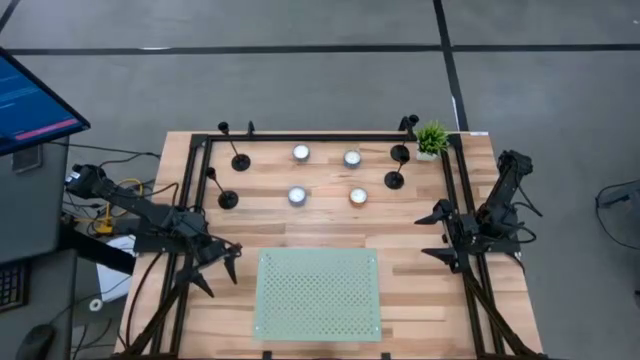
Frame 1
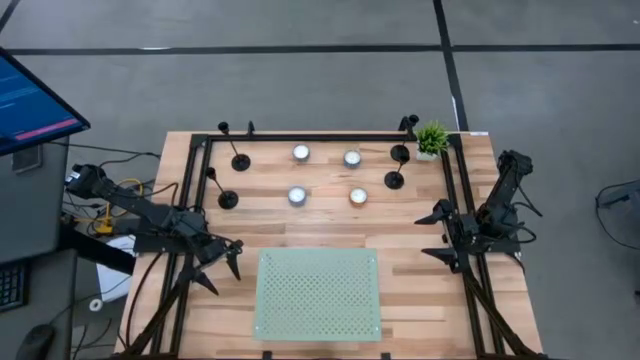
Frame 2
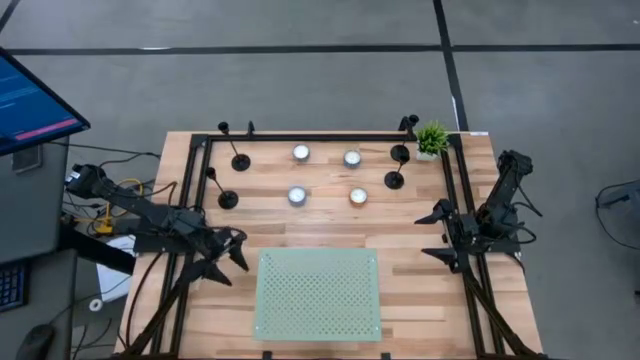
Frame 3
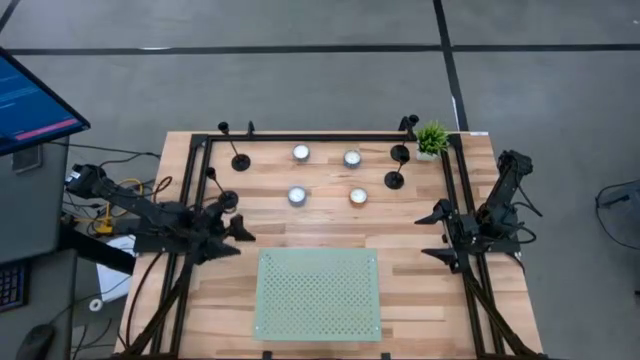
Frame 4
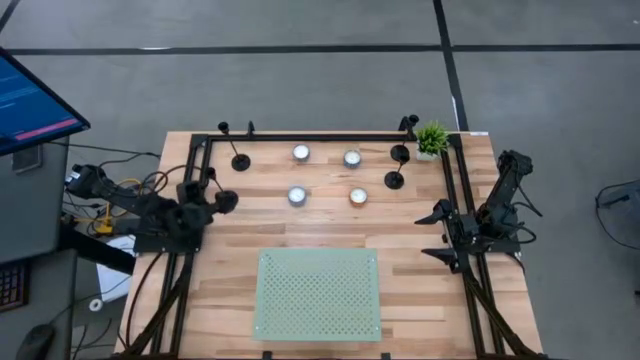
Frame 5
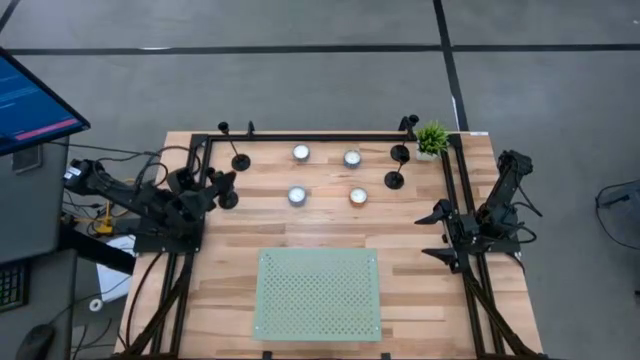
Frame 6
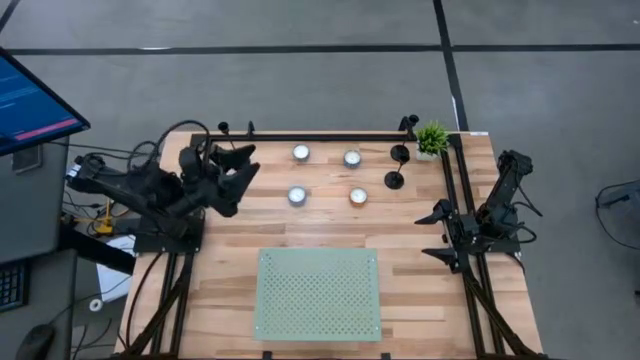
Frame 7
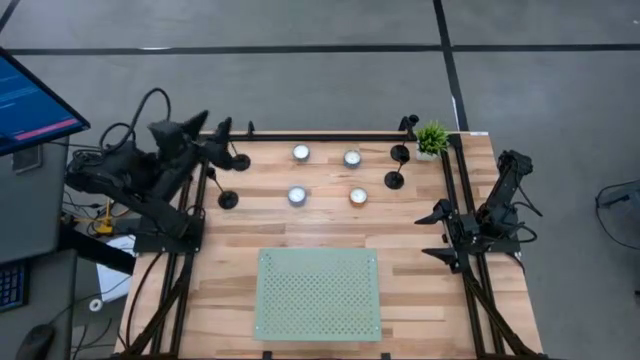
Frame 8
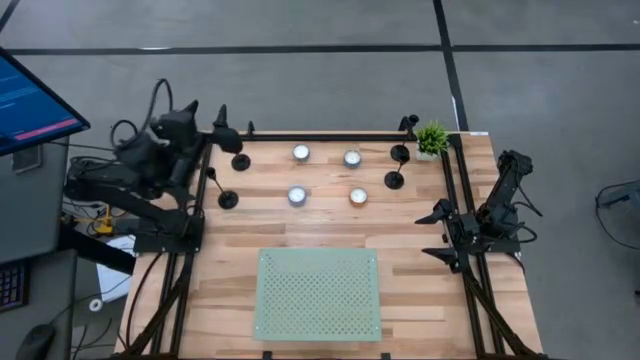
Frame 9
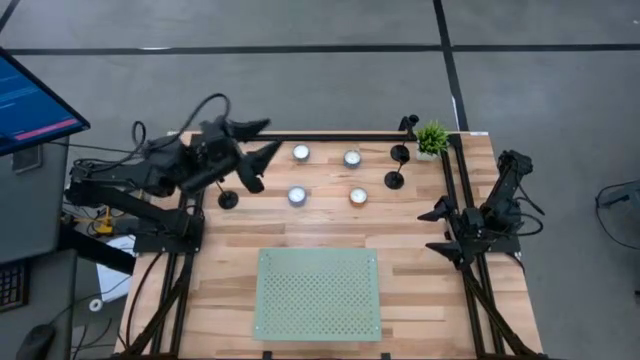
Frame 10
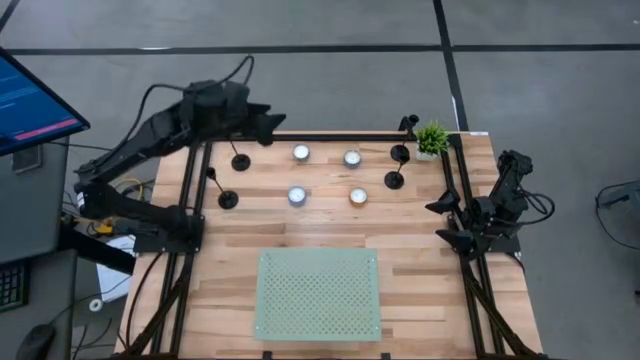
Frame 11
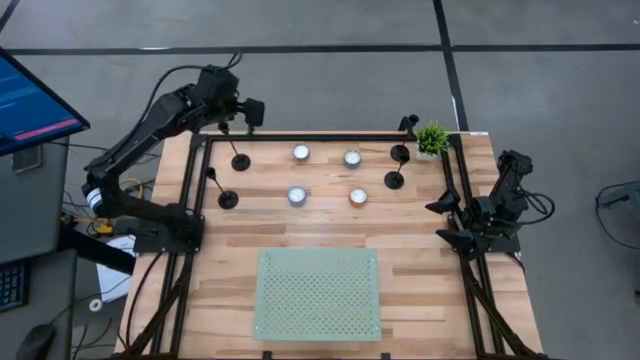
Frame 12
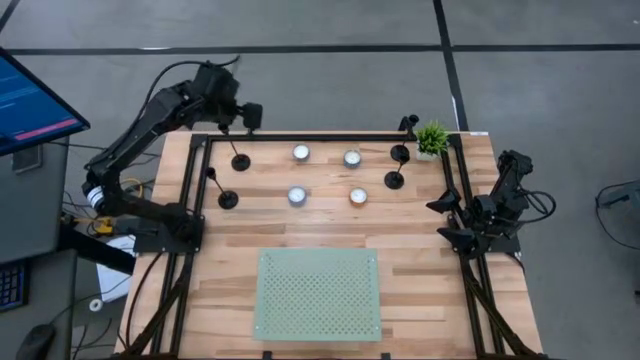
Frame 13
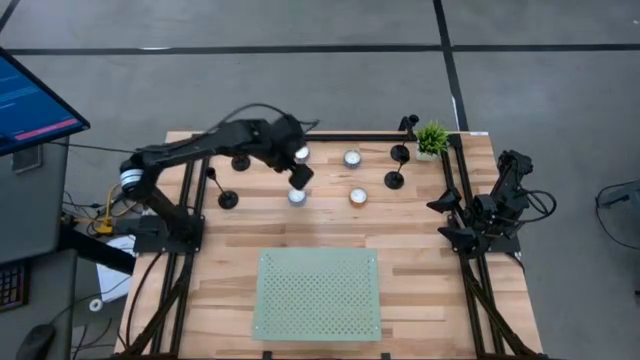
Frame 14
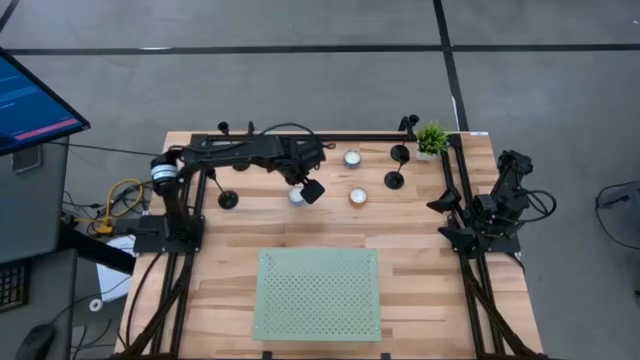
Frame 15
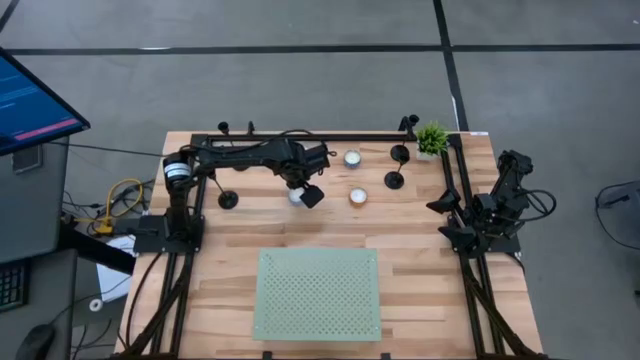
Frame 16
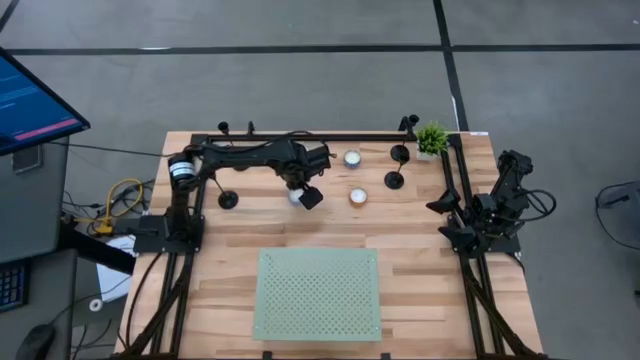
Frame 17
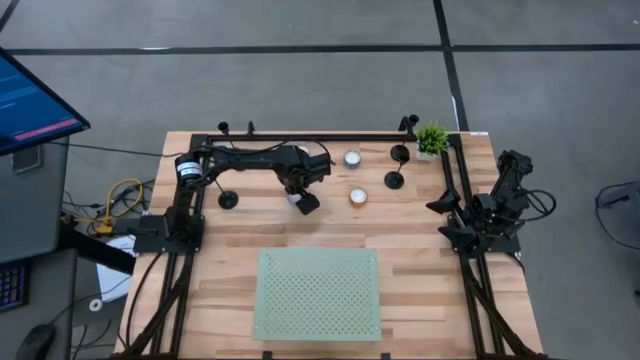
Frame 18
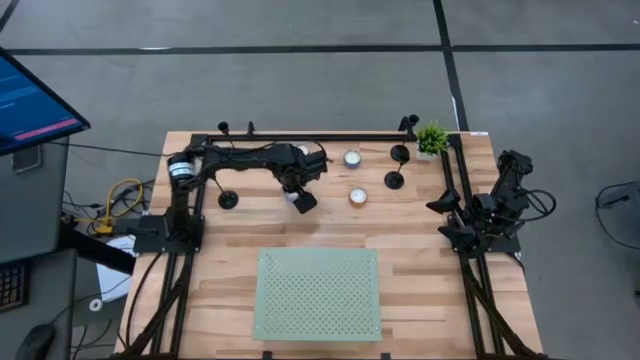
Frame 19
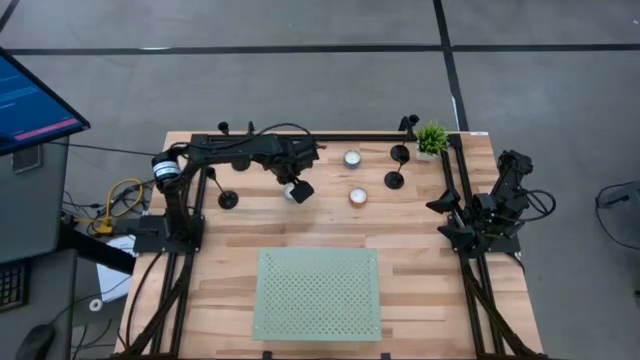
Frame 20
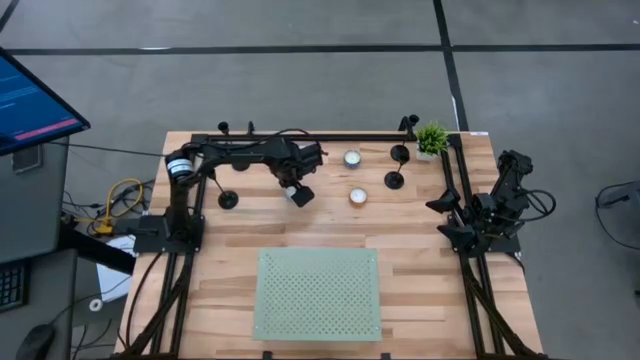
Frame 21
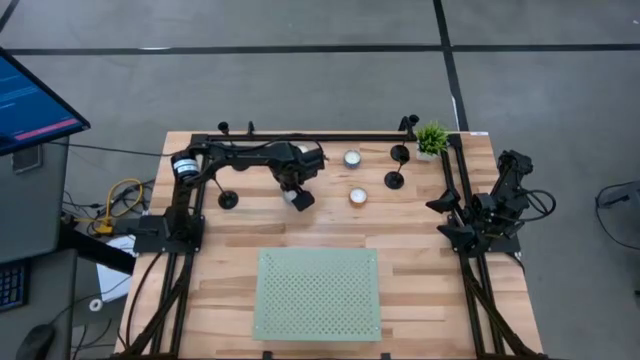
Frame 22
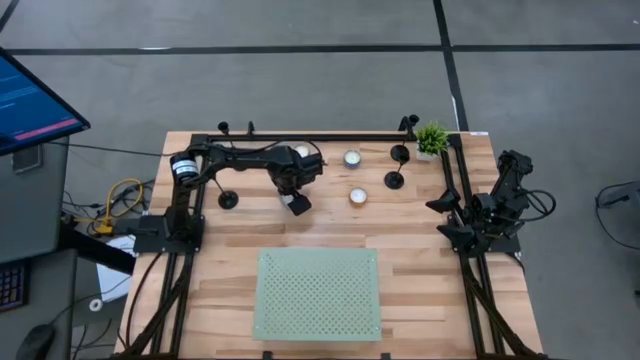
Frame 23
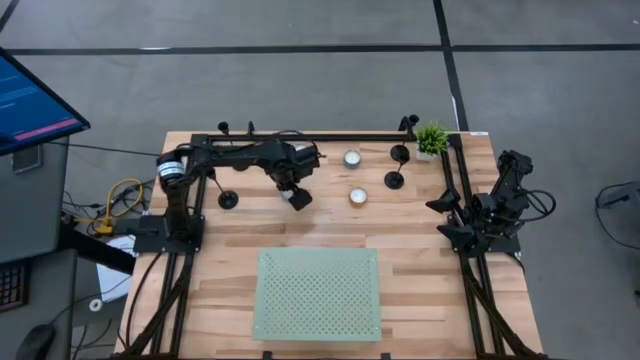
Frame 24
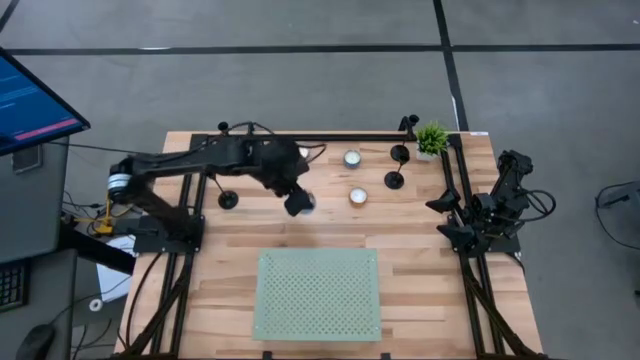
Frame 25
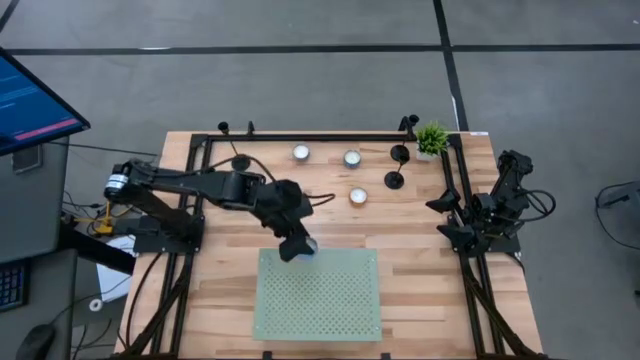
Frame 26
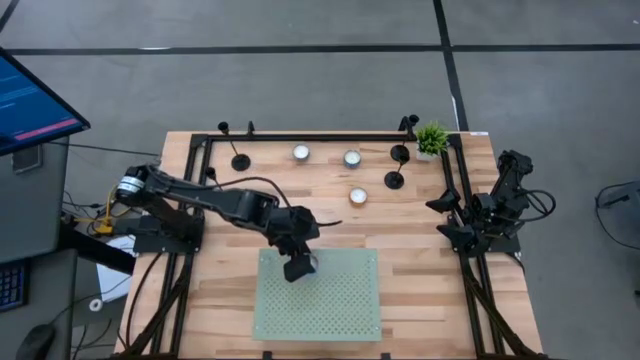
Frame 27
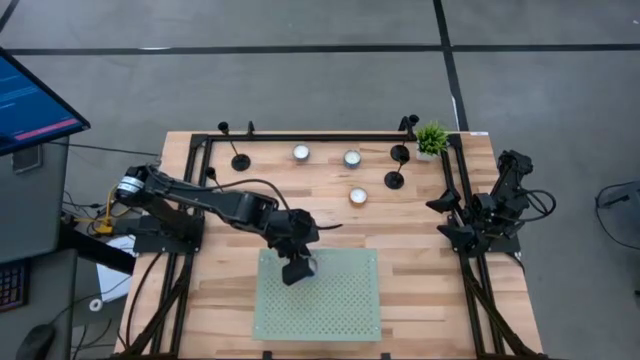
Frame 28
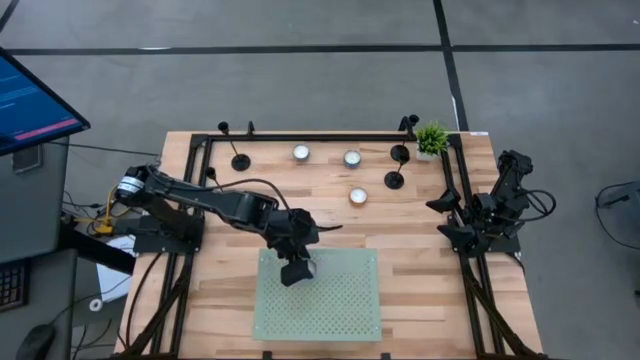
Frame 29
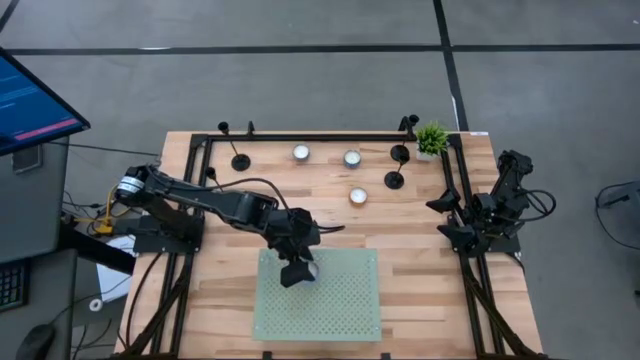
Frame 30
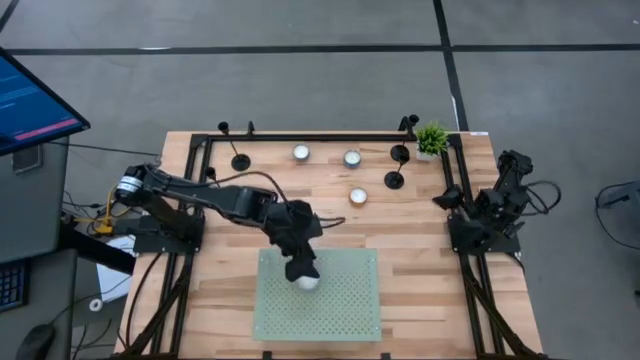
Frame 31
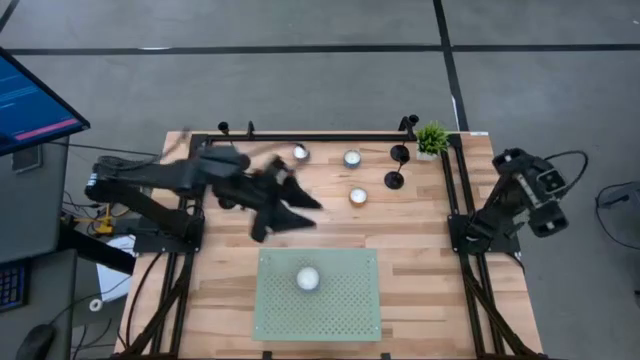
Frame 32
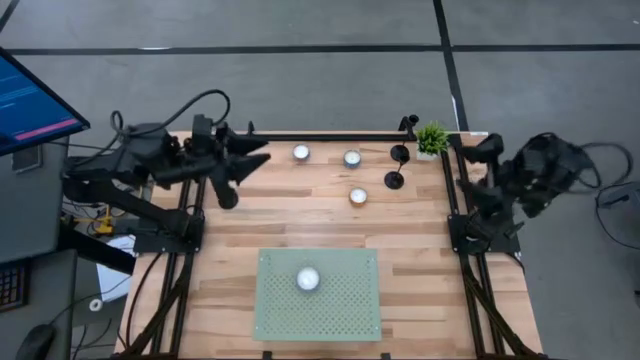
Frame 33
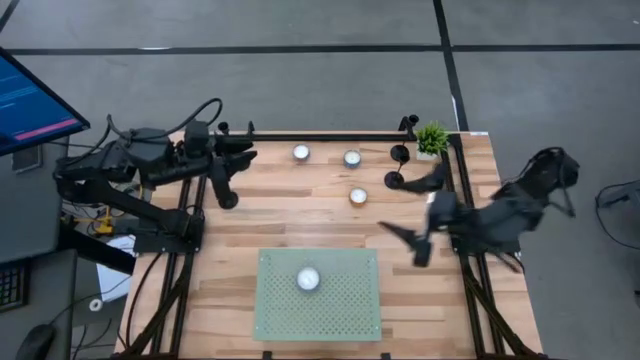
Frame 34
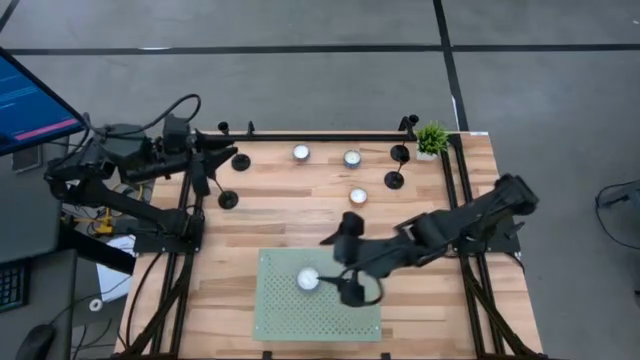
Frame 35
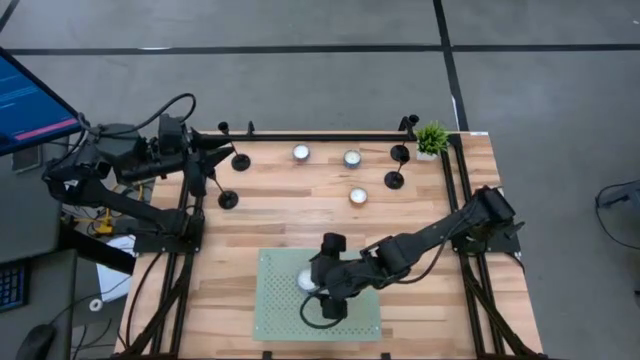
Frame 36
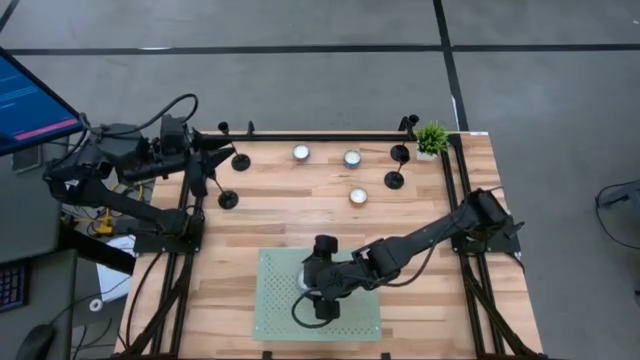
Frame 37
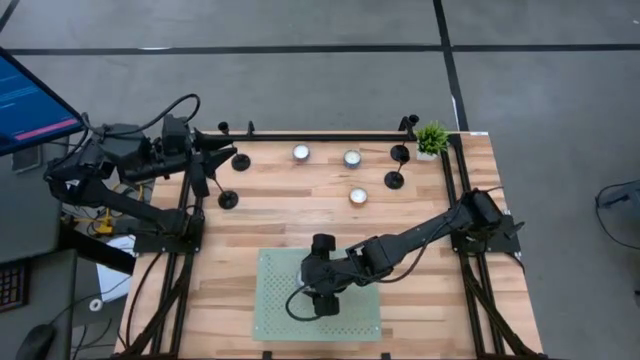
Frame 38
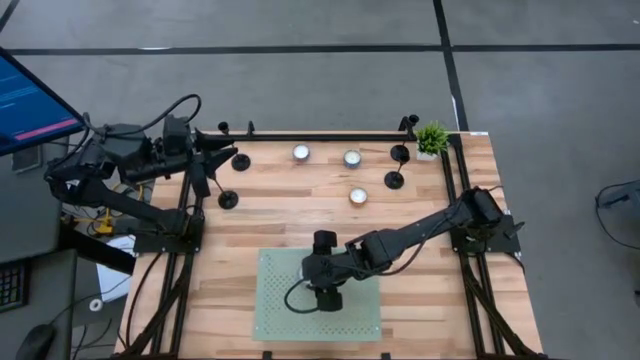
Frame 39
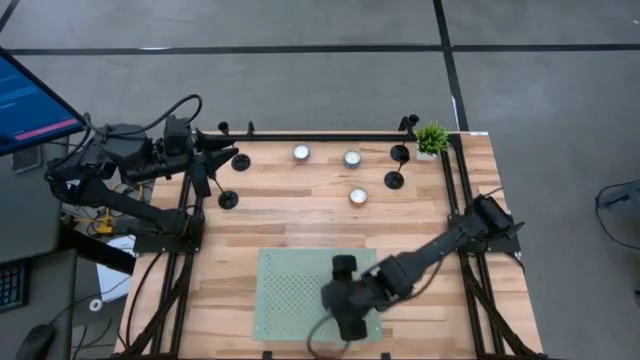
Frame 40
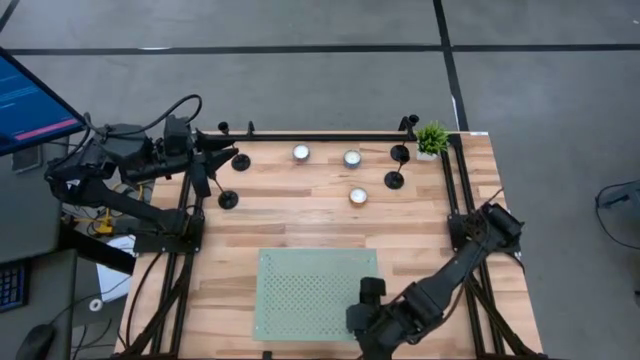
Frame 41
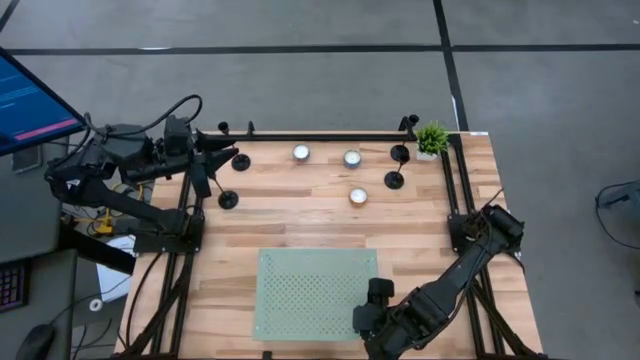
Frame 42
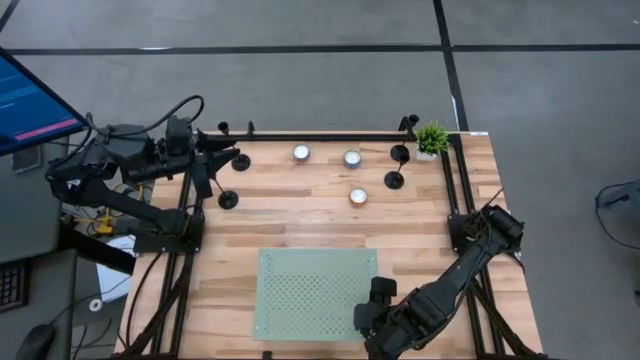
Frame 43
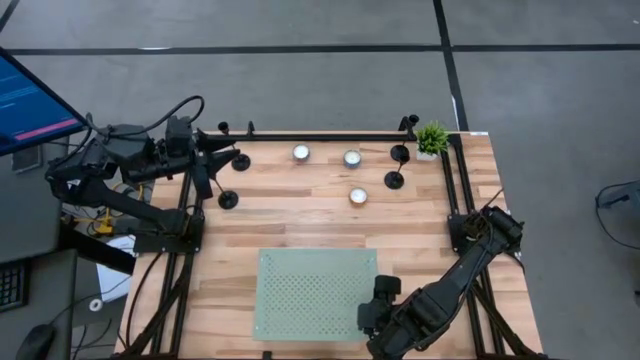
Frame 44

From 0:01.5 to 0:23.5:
Task: Stock candles on shelf
Put the light blue scented candle on the shelf
